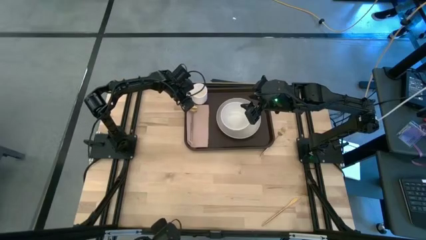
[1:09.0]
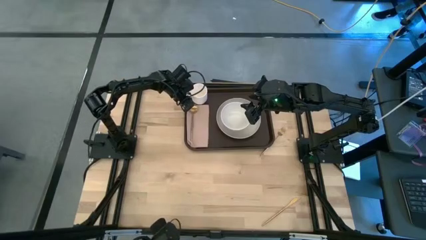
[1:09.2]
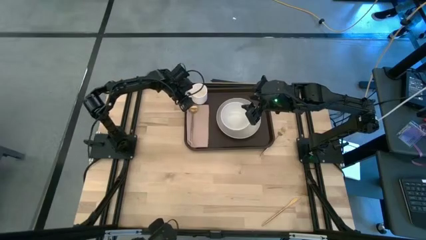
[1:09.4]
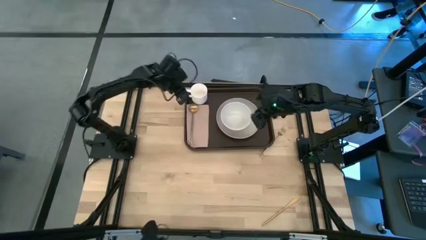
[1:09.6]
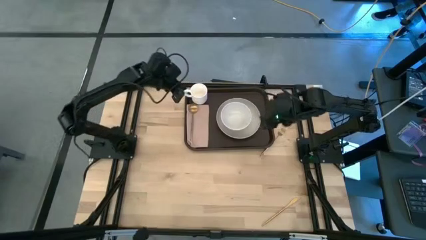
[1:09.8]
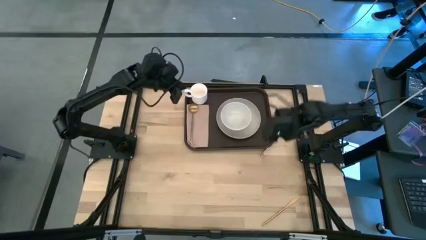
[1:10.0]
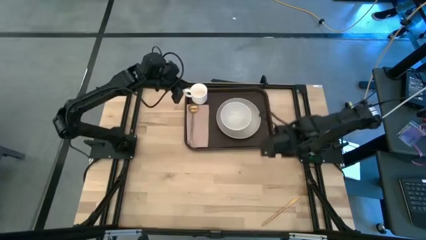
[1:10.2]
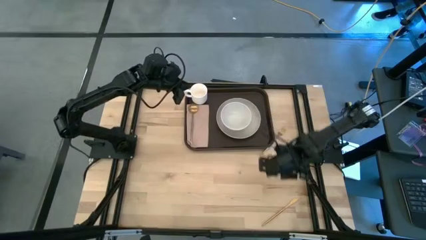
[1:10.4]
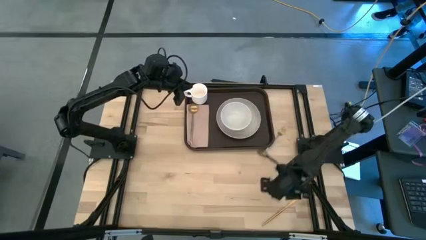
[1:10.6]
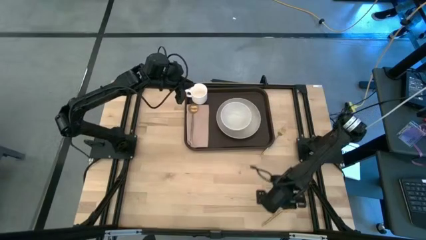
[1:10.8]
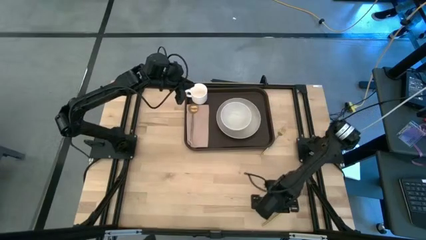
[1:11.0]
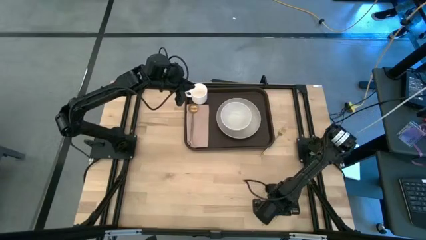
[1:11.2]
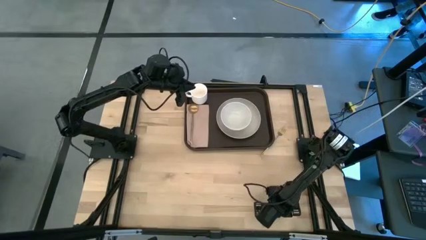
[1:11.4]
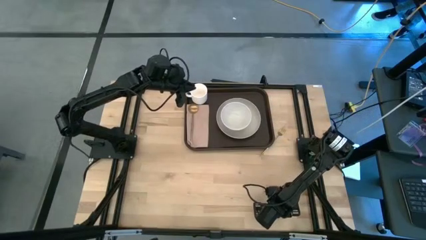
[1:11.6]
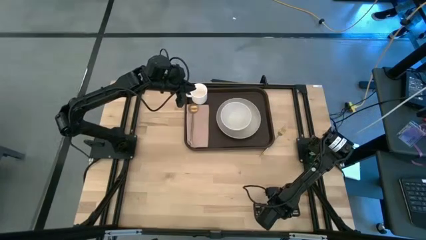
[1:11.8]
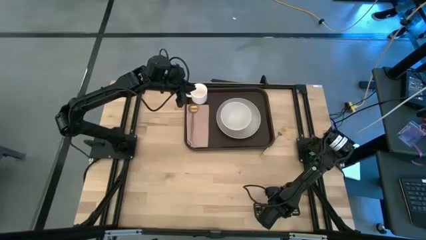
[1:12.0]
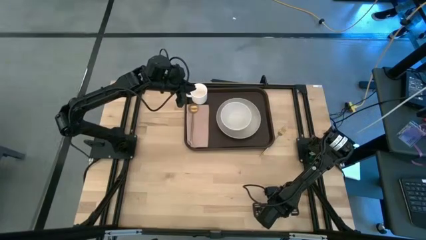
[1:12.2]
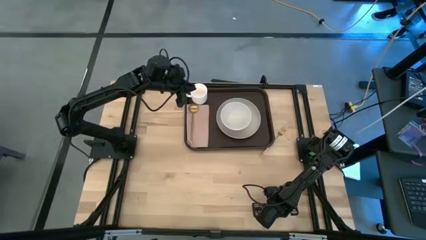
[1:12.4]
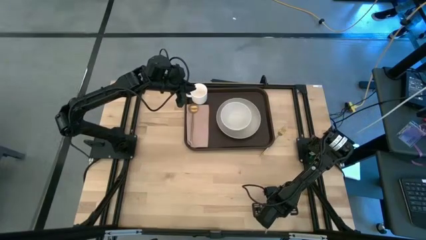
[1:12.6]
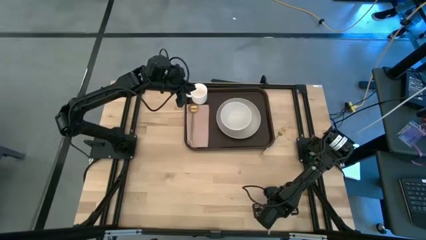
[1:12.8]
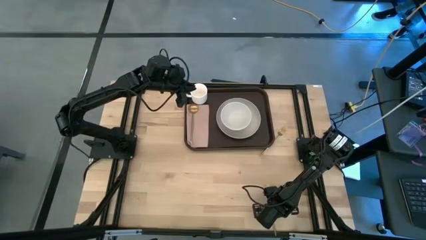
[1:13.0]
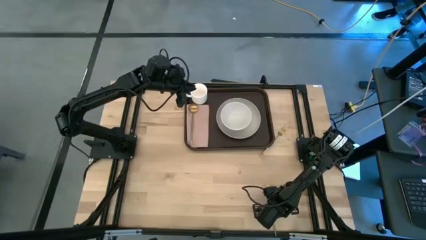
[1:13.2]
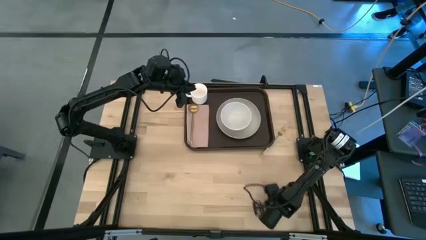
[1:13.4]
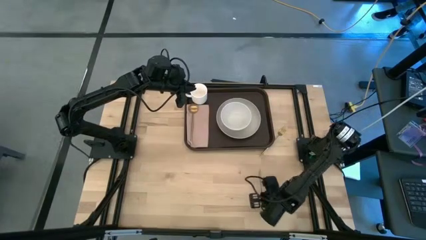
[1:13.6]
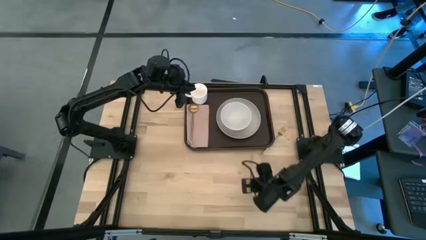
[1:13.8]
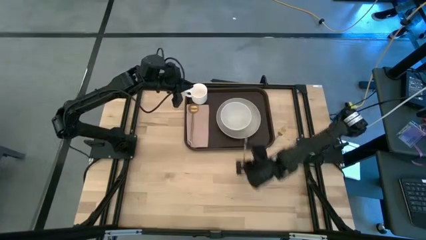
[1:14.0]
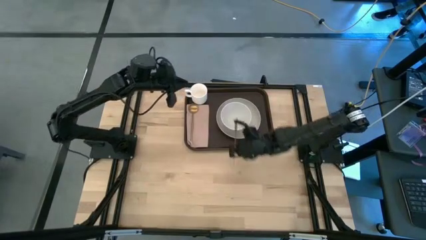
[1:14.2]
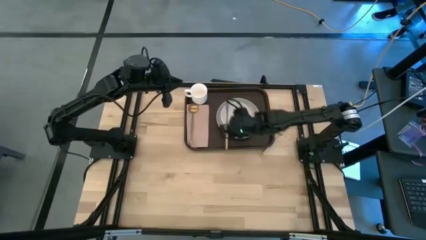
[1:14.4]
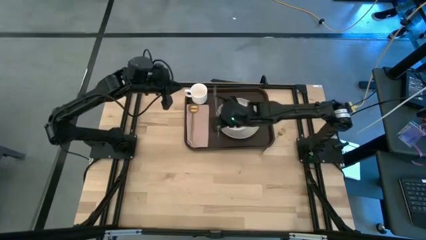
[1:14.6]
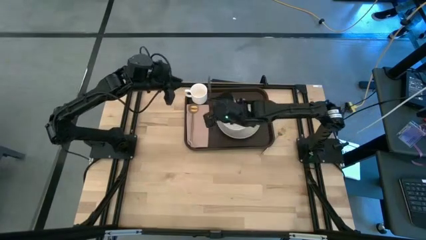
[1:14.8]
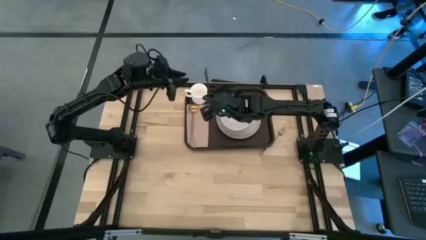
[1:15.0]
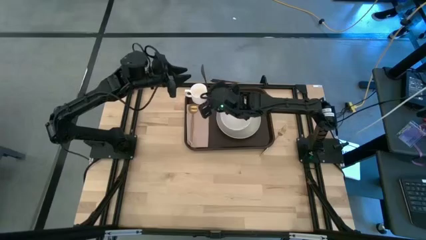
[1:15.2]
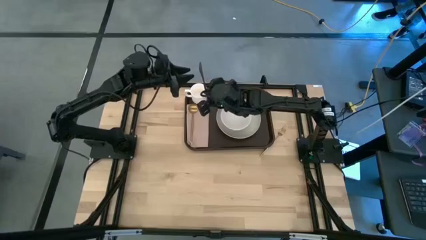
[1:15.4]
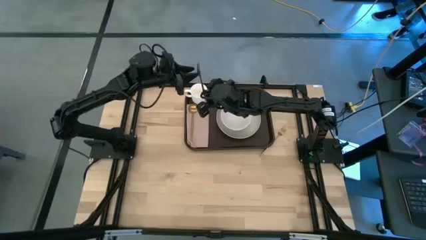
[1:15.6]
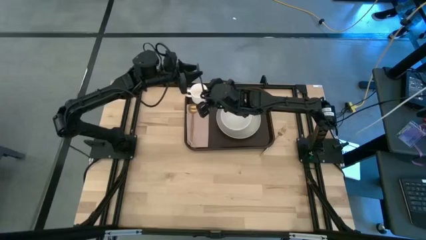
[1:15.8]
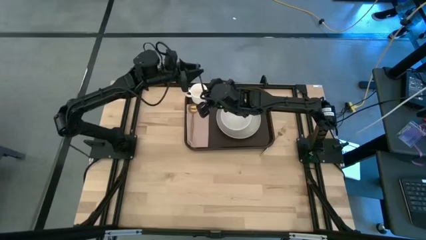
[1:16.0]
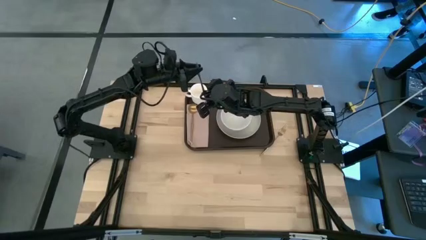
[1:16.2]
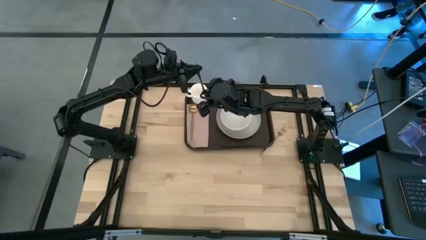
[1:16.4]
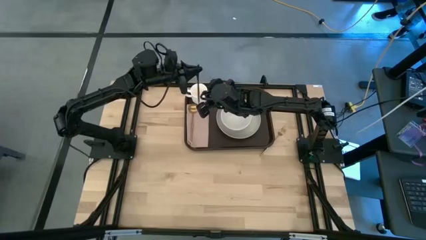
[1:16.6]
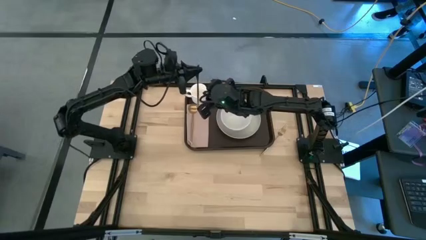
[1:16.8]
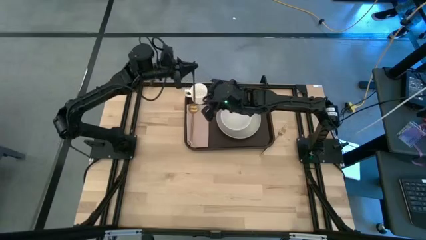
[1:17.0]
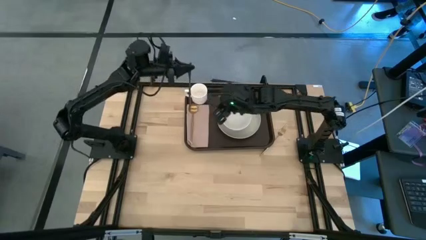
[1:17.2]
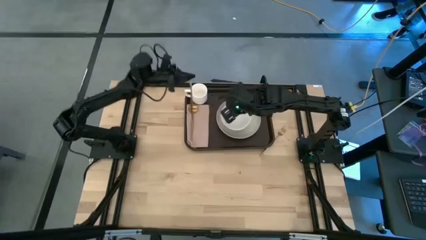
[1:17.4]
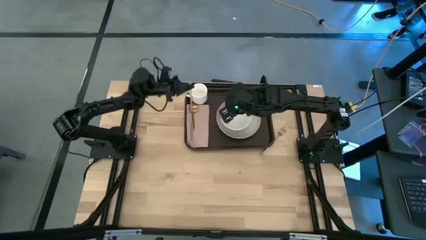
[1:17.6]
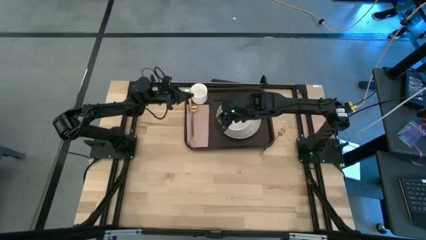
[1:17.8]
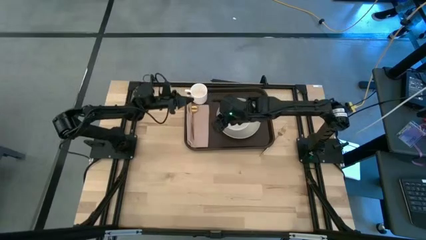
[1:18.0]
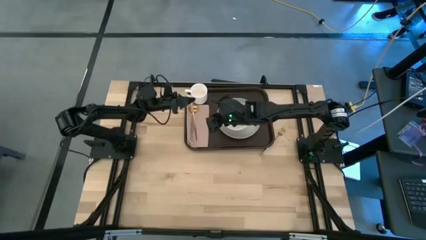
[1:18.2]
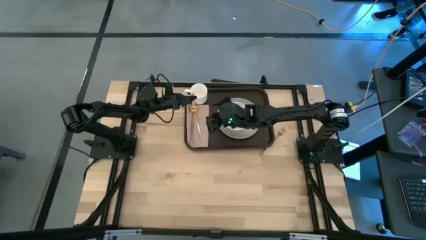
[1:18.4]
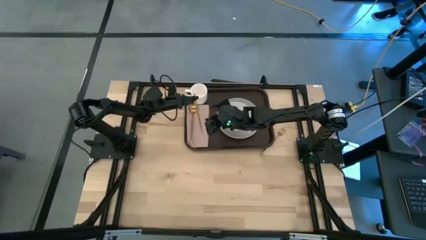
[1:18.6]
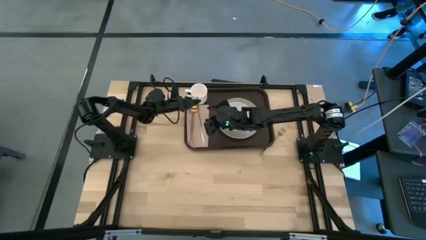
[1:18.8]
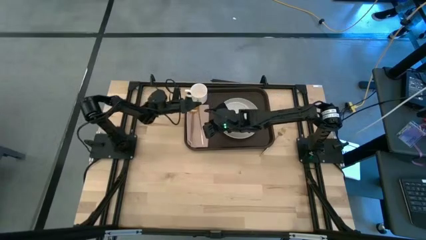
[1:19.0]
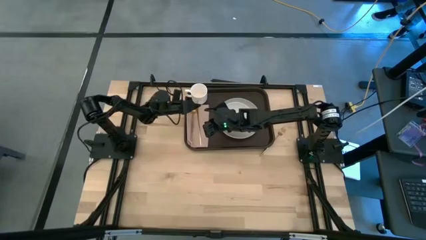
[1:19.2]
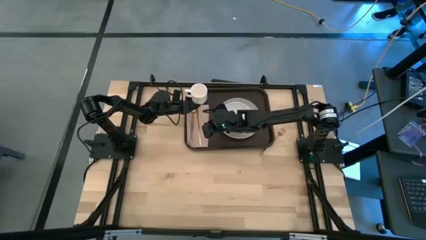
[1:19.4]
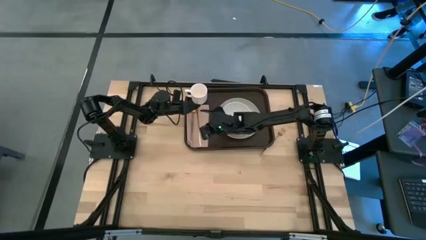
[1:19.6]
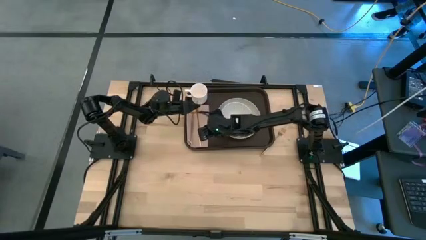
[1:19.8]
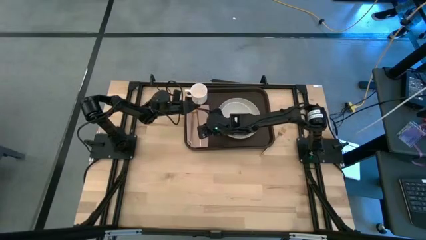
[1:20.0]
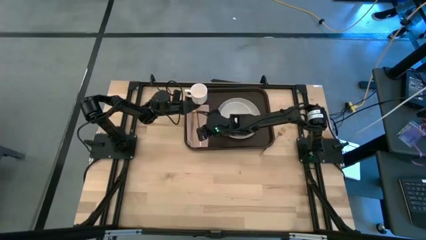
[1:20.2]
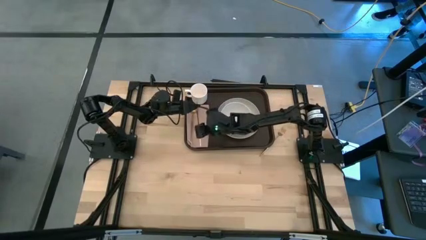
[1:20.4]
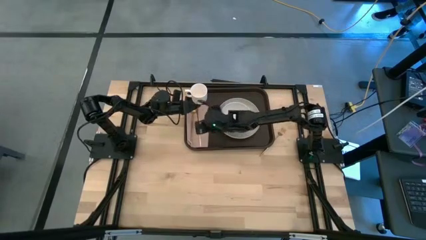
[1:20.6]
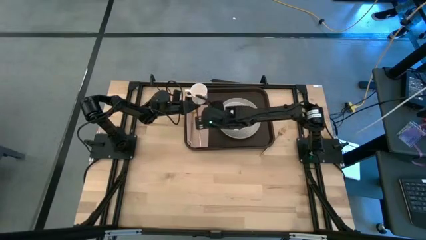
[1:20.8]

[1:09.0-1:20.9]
Task: Set up tray
Put the gold knife on the light brown napkin to the right of the gold spoon

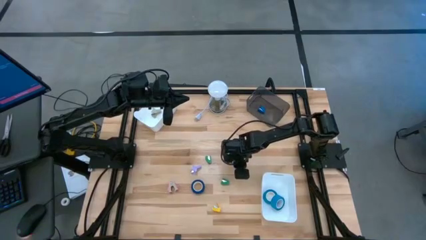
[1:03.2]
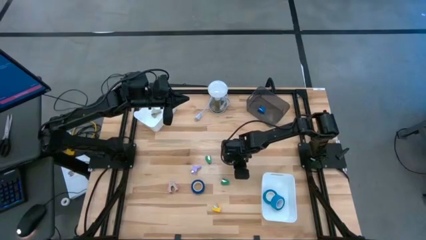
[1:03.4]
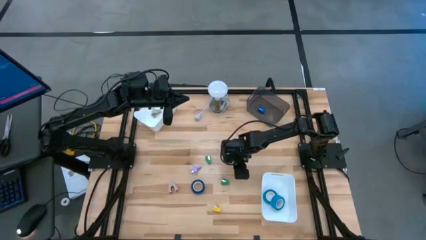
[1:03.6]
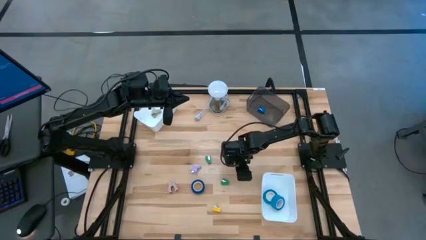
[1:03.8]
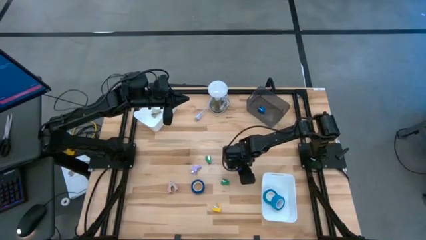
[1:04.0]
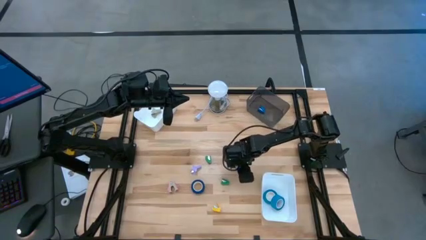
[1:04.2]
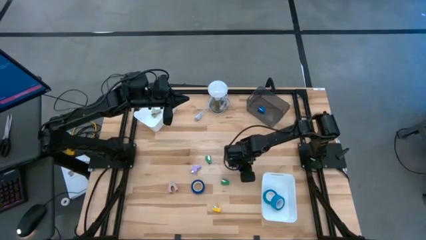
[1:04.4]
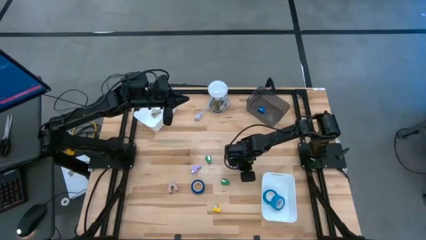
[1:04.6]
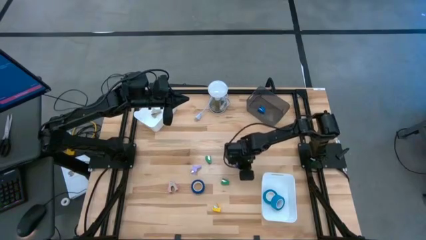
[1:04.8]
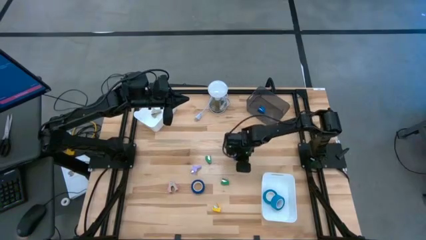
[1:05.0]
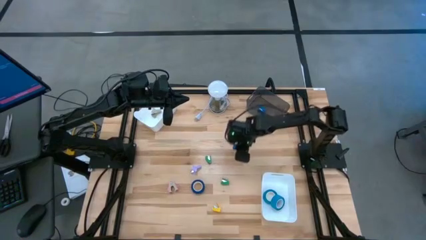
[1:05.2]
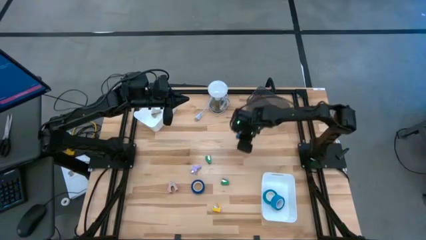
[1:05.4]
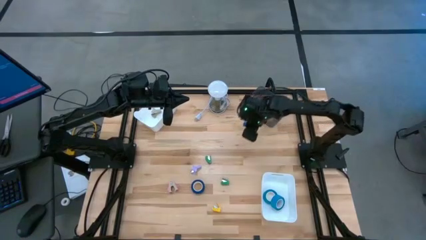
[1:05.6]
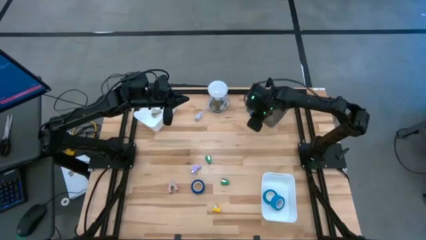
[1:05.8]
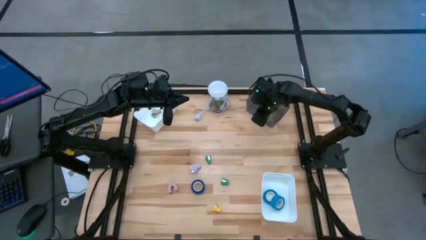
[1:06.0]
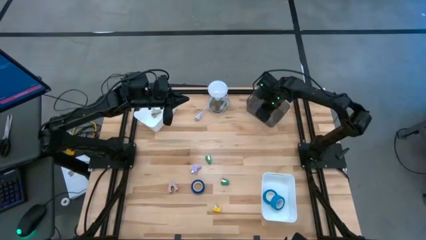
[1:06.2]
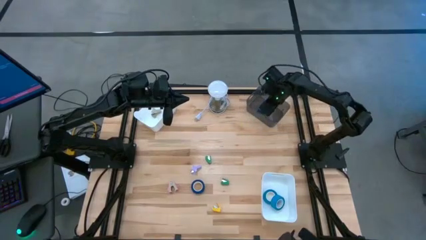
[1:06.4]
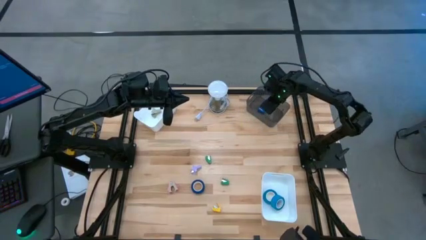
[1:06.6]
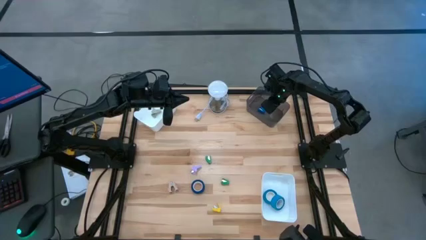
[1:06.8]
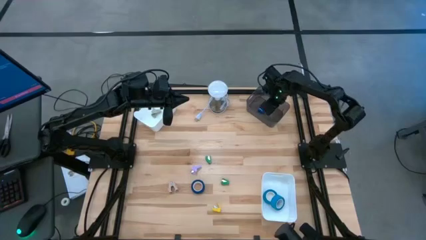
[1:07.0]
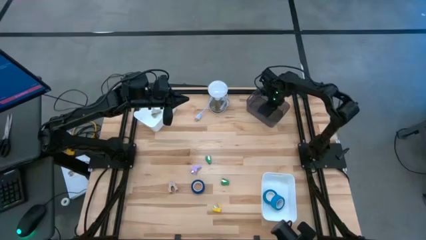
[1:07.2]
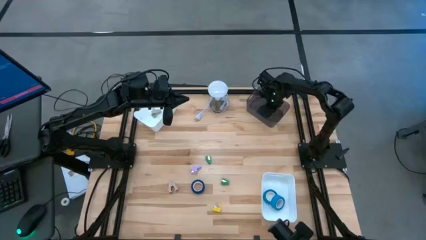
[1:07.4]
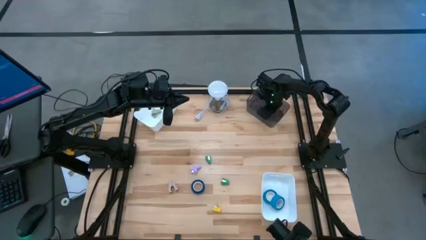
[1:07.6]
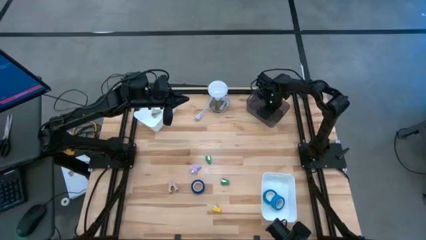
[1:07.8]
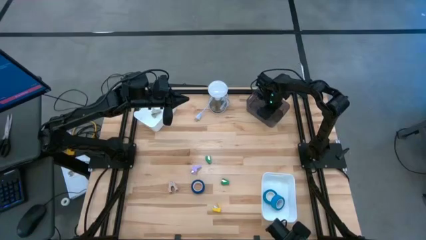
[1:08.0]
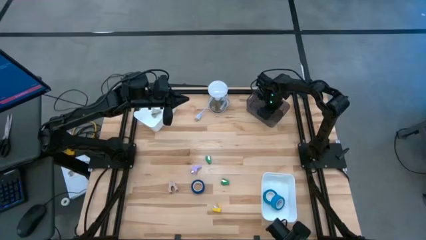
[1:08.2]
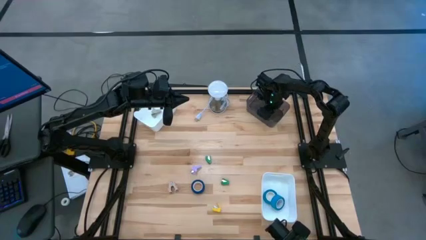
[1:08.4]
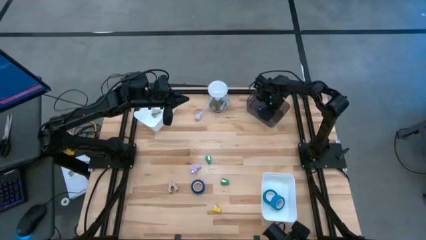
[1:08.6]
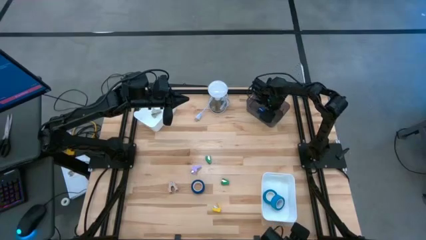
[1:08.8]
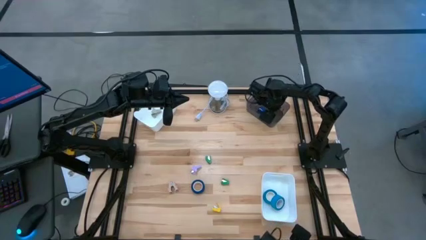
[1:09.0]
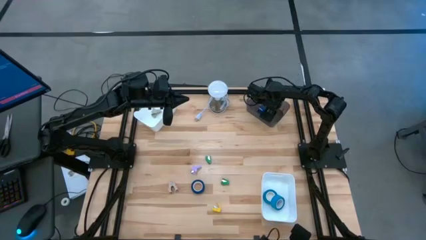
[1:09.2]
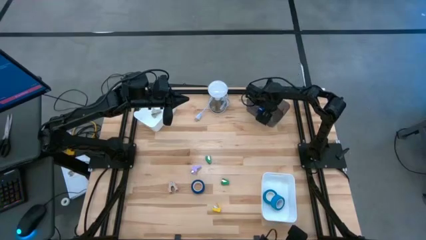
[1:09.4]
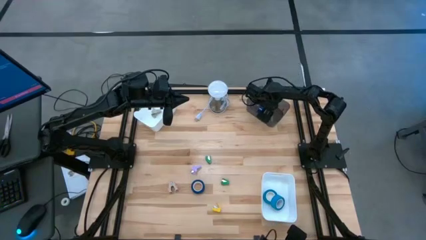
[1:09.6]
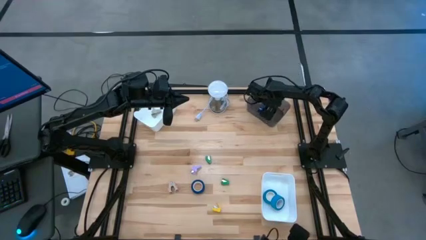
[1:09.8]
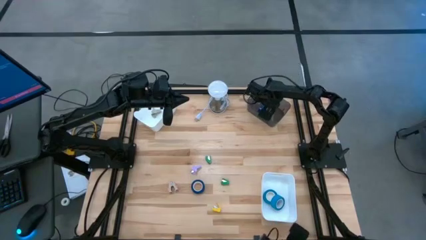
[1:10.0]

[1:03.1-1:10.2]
Task: Pick and place Stapler, Stapler remover, tape
Put the blue stapler into the black bin
